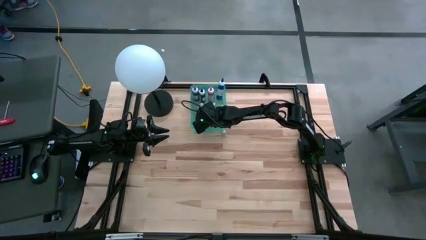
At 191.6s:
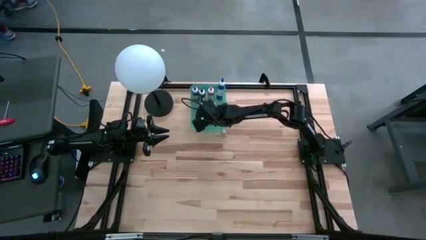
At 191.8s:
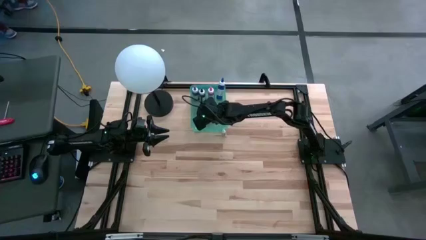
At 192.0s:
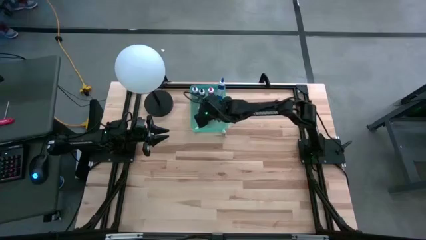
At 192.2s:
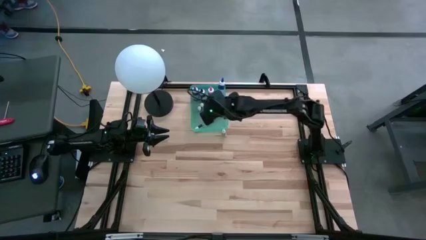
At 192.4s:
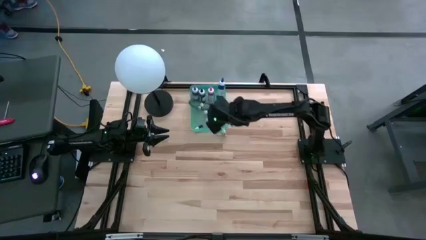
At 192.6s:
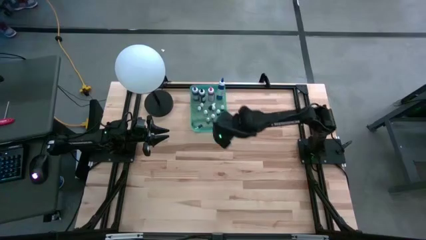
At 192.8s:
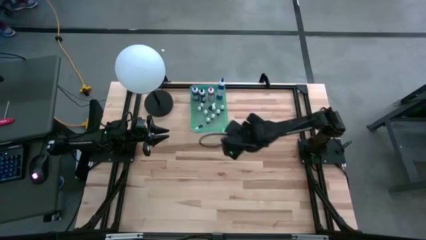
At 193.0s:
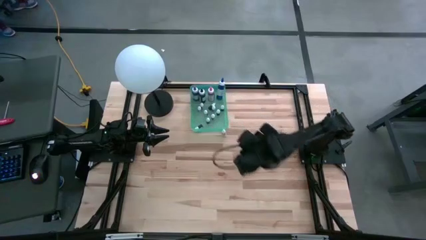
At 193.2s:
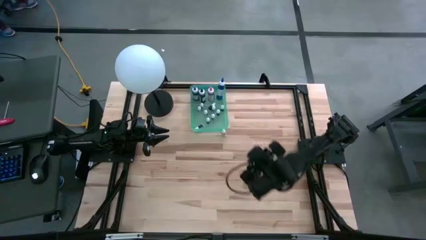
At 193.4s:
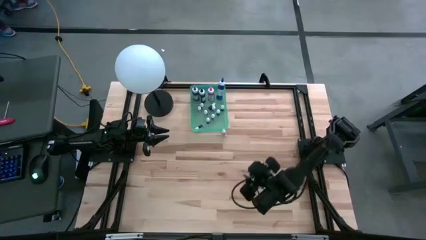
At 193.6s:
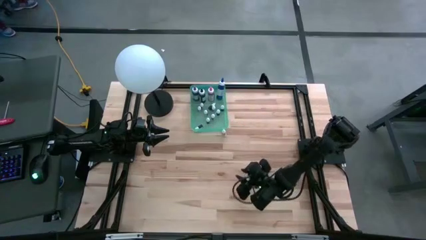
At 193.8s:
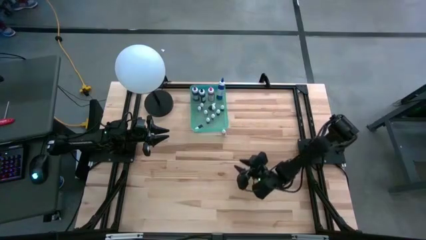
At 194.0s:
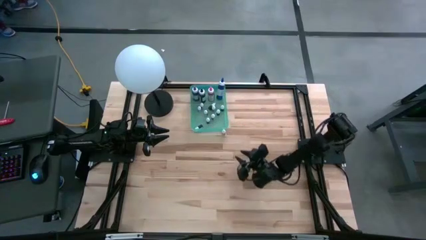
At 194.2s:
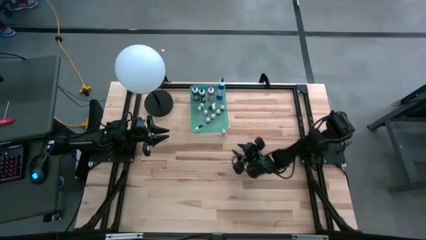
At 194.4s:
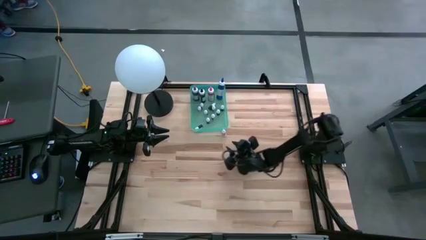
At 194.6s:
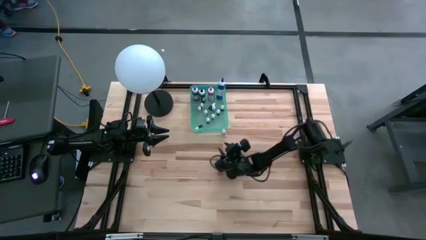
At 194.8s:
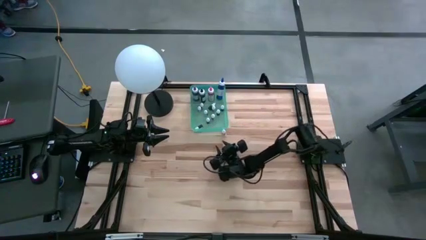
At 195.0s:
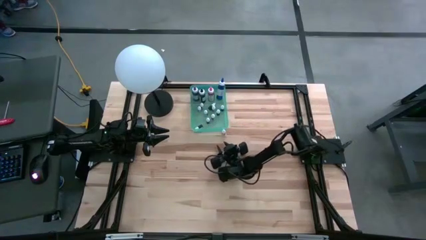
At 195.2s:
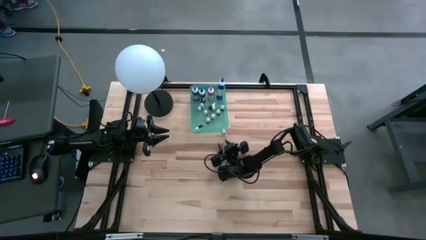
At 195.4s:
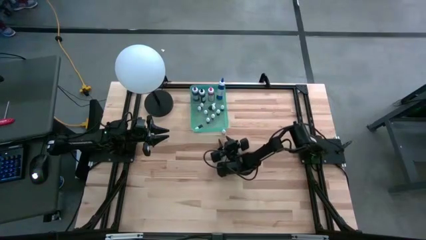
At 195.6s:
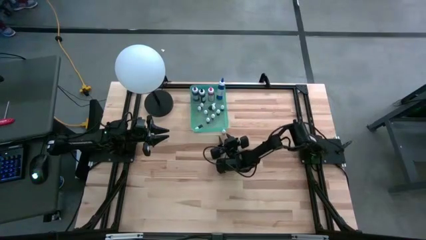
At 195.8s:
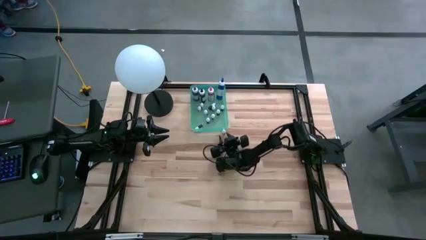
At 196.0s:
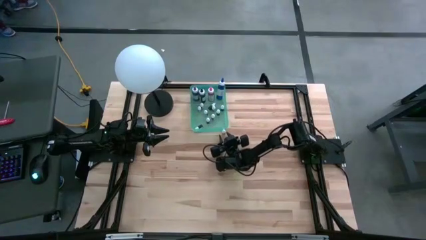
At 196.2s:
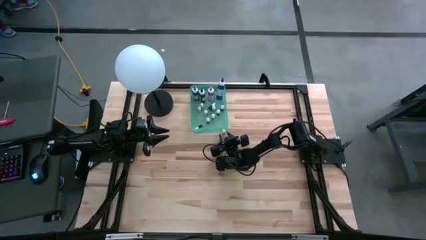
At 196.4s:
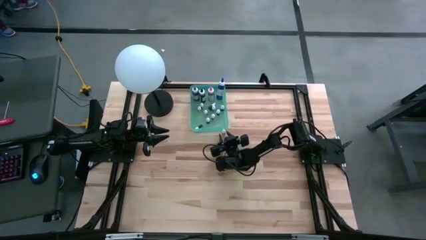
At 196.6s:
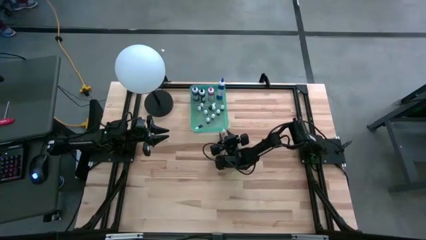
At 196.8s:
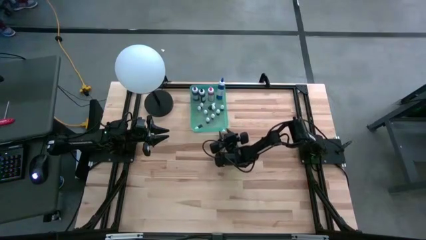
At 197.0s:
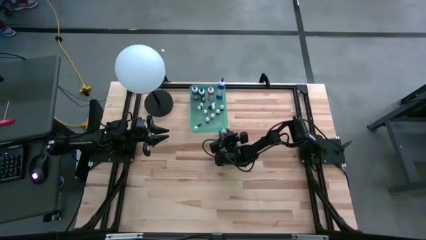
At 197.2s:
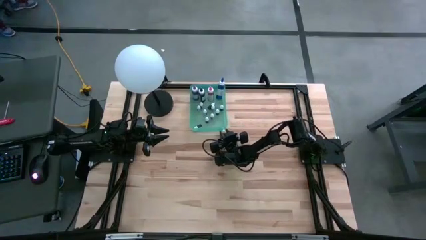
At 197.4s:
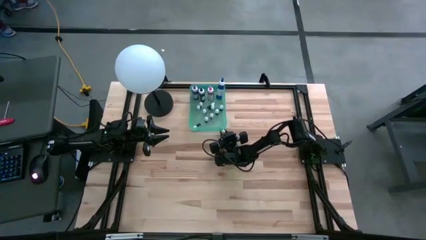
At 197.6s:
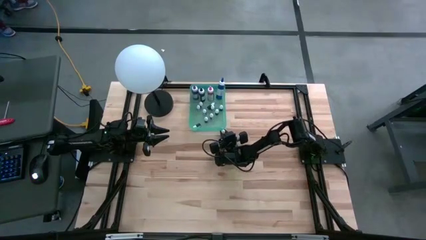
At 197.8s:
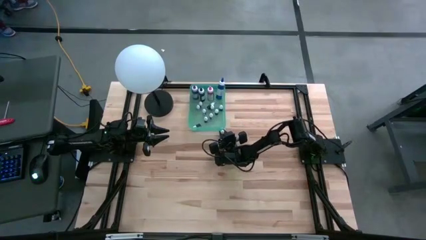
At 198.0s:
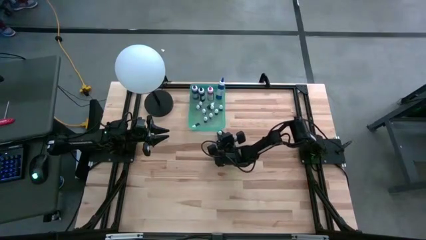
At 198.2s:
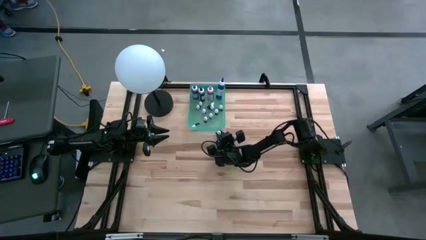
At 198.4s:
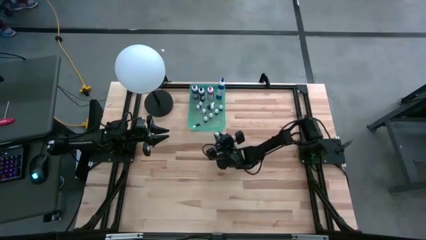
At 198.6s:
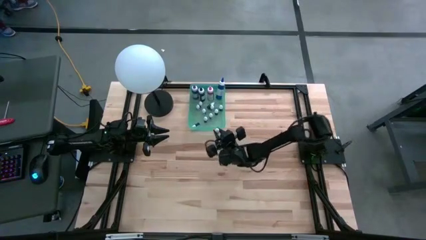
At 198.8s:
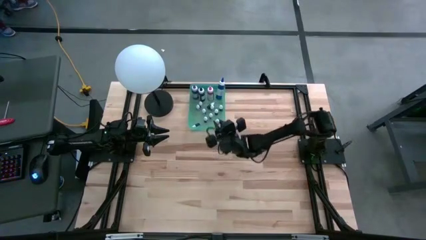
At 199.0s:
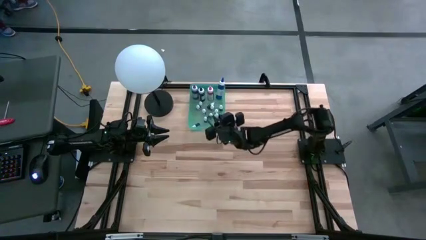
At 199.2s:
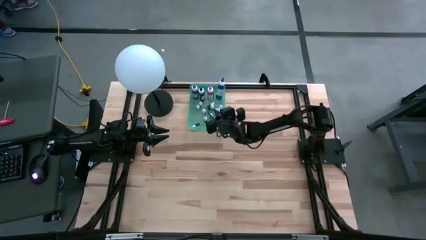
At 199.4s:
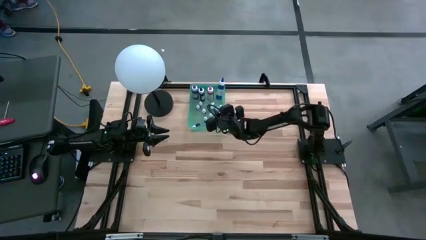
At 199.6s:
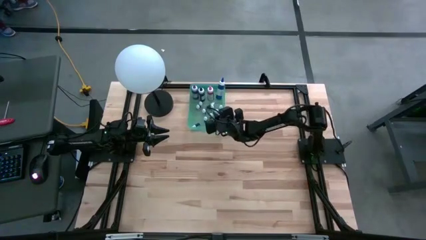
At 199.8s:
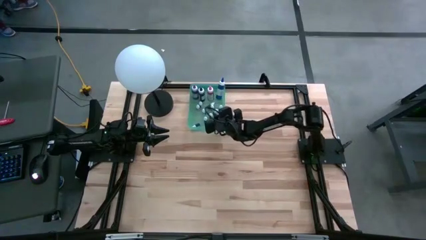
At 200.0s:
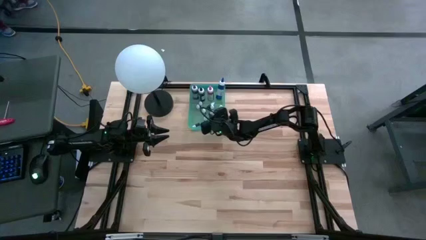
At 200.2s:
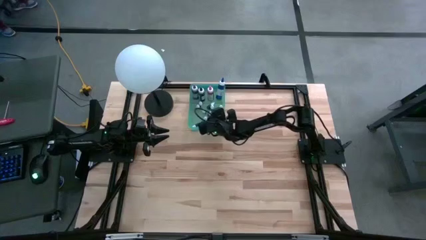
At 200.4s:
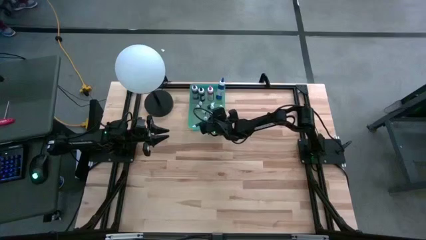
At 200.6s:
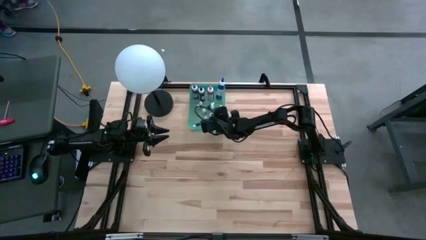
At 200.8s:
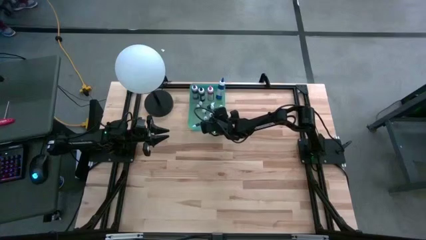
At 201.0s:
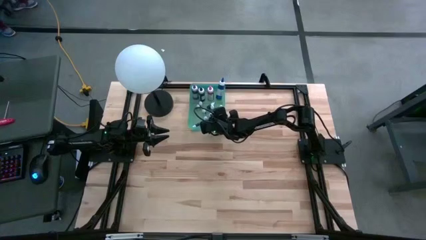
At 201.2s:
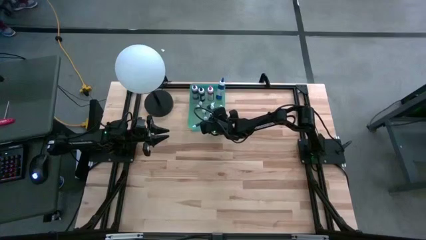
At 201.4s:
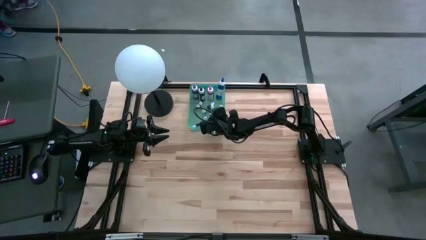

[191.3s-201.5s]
Task: Pick & Place food coloring
Put the small orange food coloring bottle into the blue bin

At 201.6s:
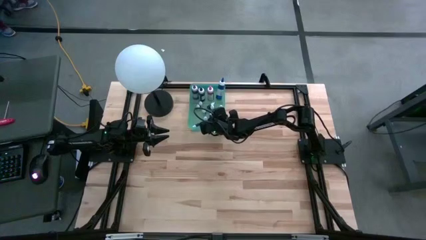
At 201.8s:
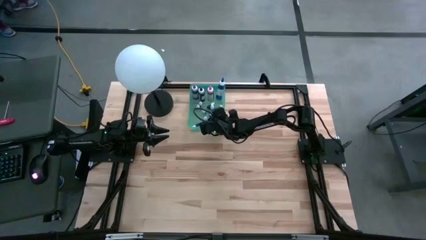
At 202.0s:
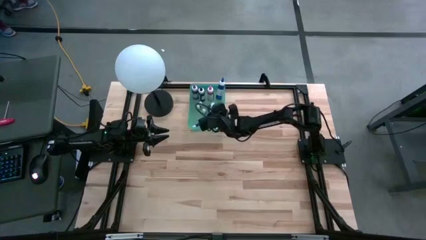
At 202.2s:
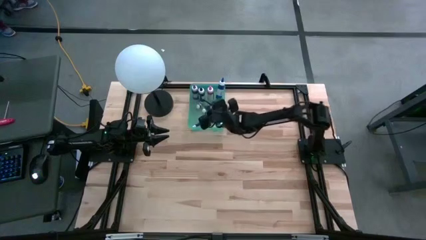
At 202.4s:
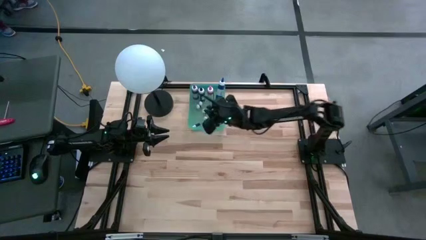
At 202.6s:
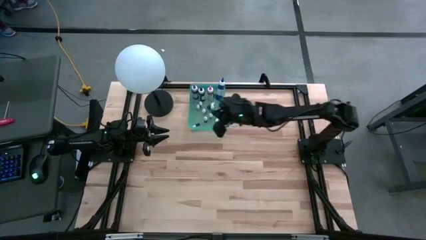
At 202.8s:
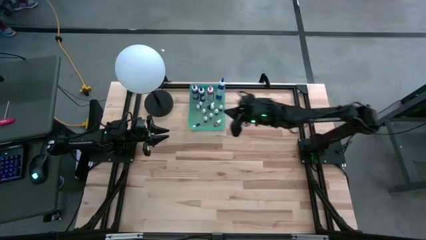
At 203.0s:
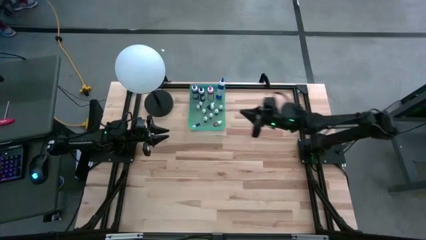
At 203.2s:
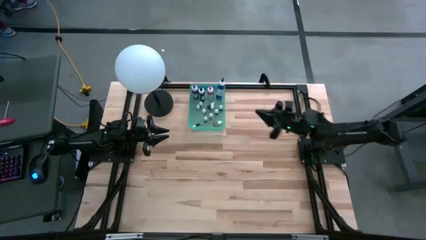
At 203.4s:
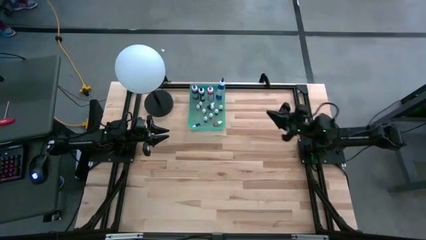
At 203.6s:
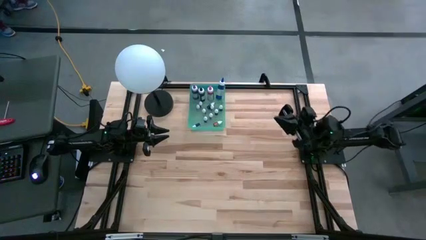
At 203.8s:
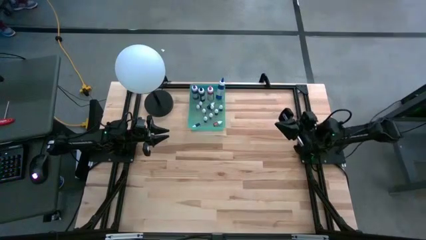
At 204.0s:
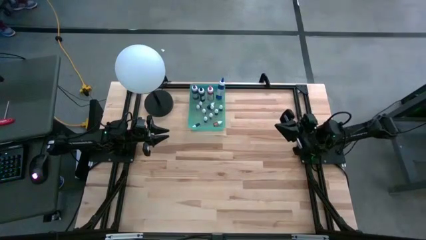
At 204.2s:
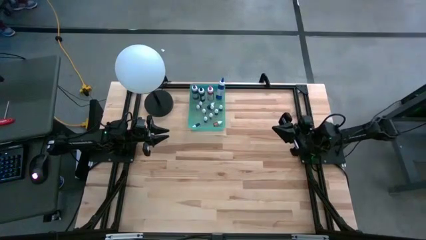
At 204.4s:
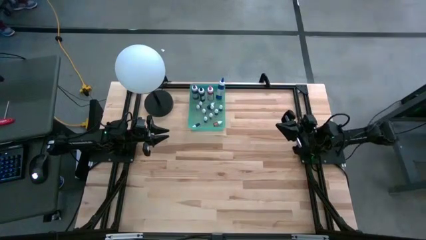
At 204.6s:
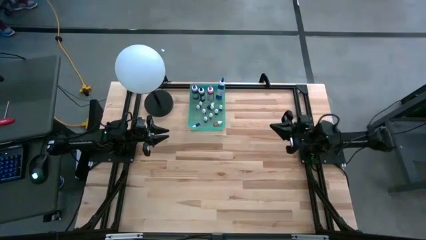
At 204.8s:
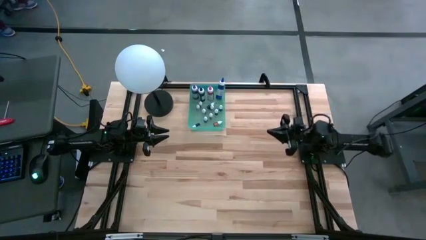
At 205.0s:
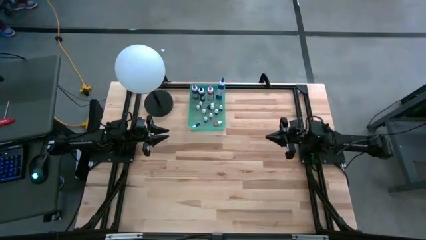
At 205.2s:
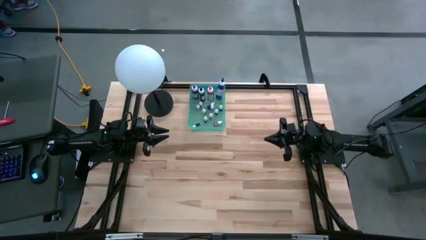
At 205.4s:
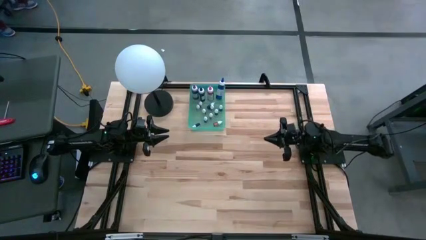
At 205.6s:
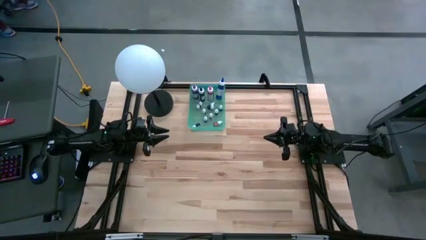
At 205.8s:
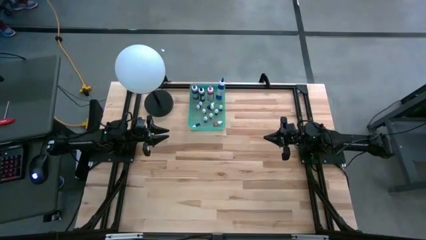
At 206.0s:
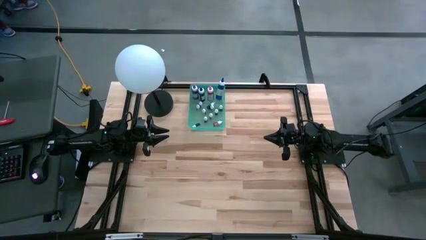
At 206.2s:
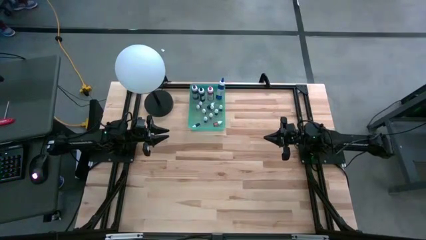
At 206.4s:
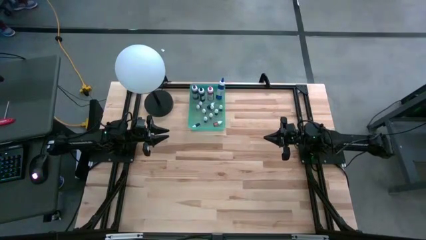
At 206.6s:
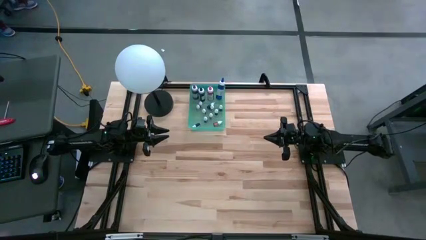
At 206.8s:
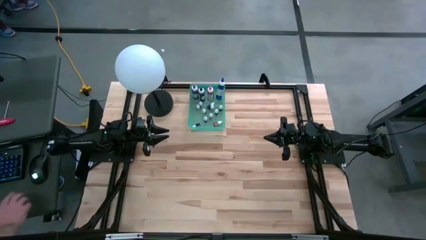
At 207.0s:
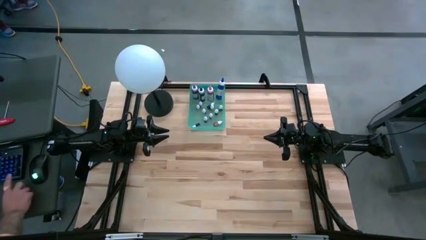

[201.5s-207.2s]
Return to Home Position

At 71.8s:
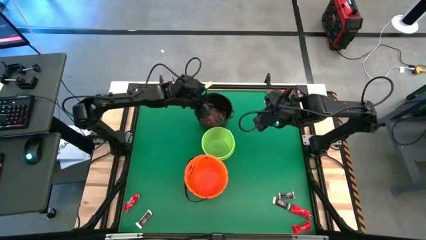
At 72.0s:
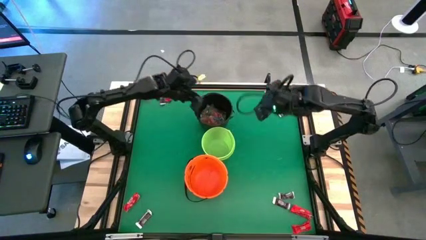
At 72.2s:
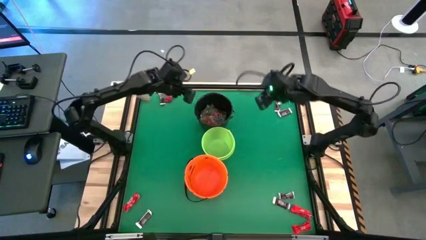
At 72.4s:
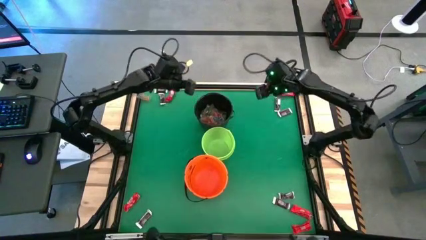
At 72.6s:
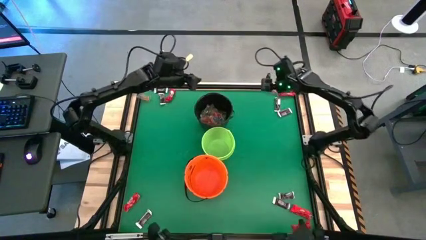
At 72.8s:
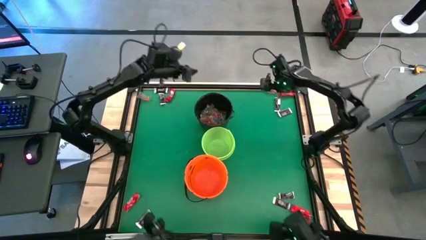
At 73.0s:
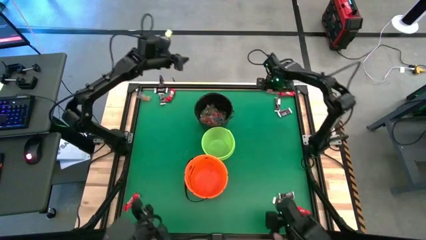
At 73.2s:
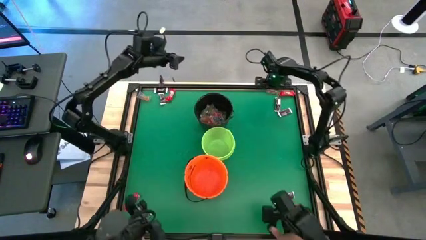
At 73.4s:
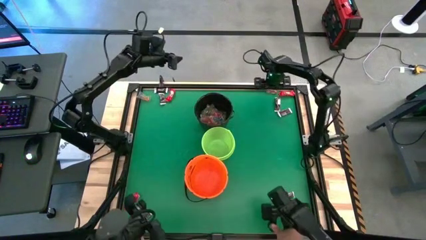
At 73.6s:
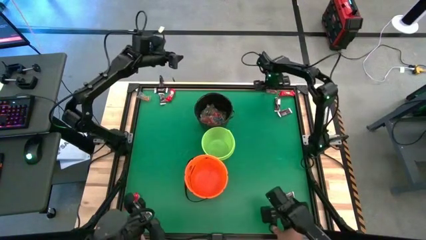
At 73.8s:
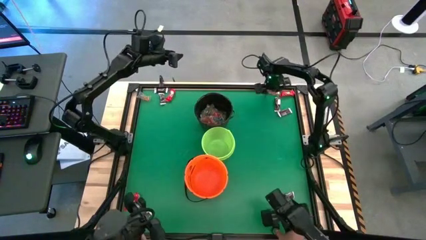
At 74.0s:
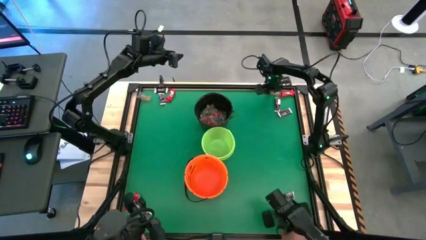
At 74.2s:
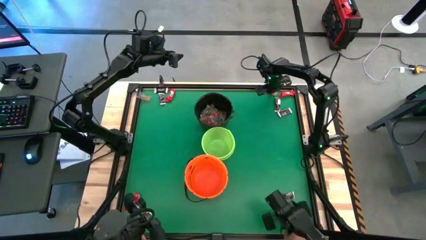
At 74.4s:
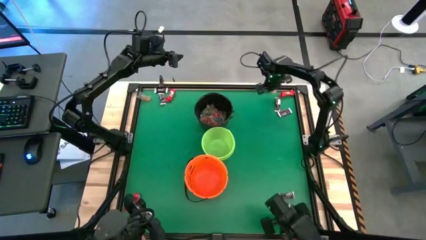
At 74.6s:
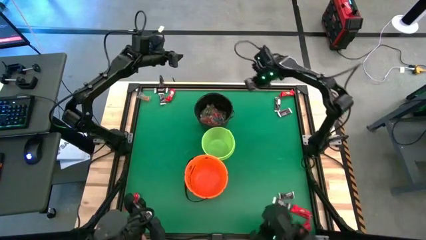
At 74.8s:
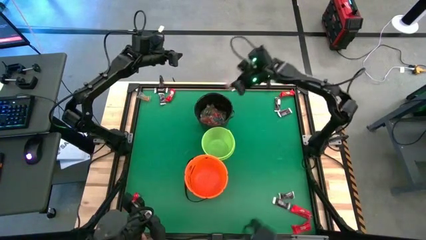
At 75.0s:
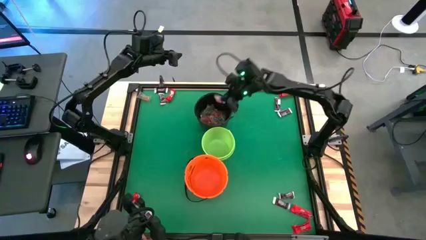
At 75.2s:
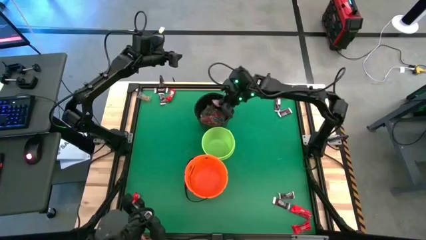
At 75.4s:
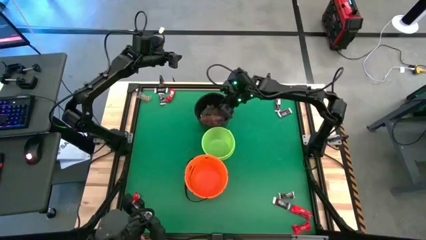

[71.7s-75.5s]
Task: Sort candy by brand, put in halloween buckets
Put the orange gummy into the black bucket
